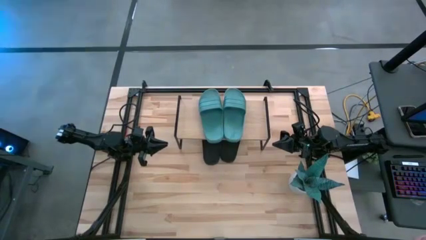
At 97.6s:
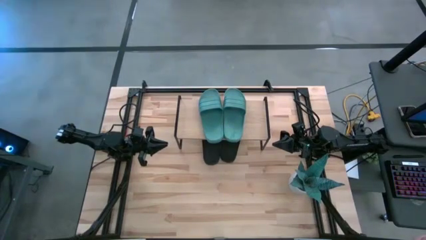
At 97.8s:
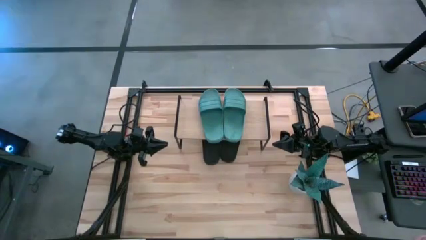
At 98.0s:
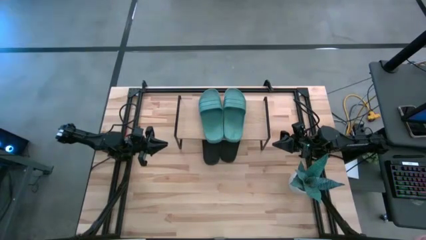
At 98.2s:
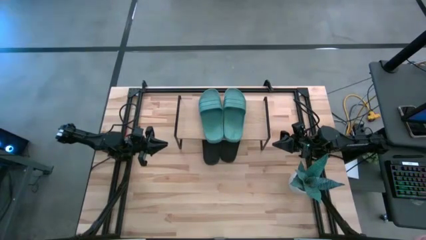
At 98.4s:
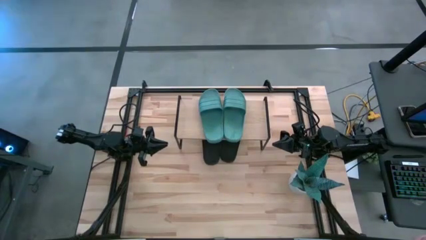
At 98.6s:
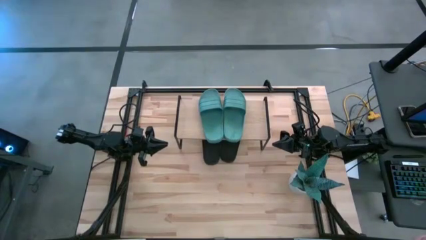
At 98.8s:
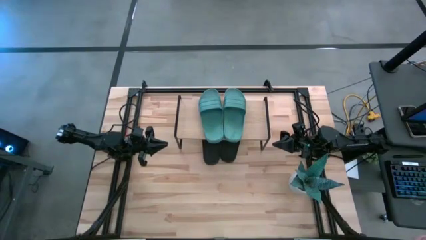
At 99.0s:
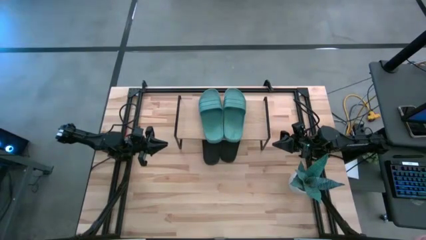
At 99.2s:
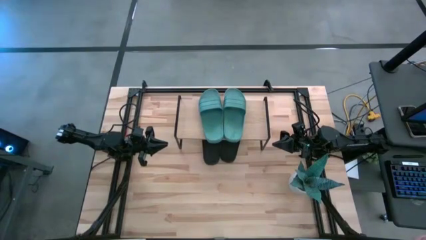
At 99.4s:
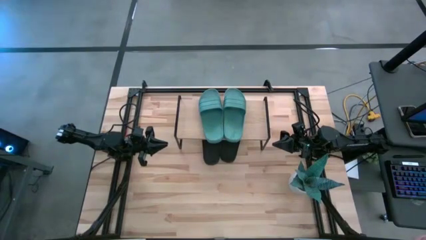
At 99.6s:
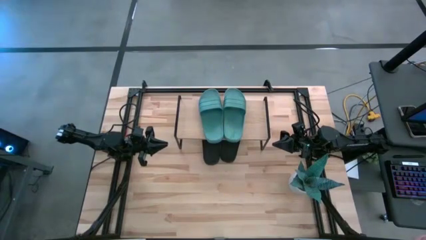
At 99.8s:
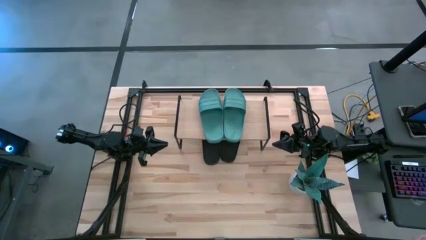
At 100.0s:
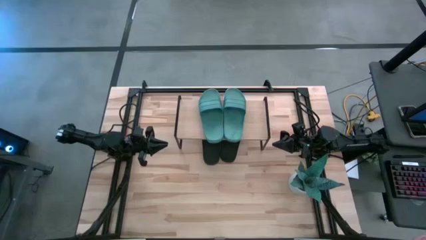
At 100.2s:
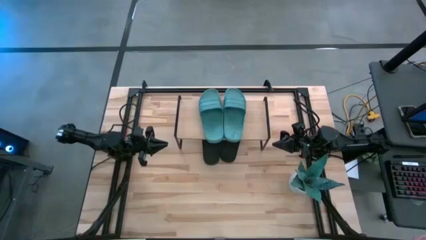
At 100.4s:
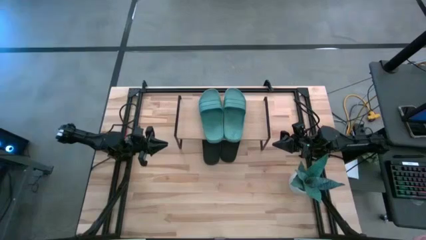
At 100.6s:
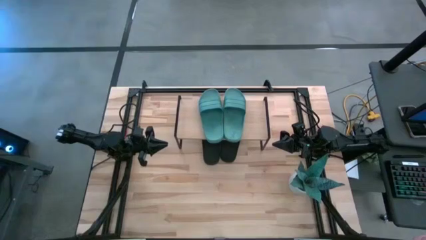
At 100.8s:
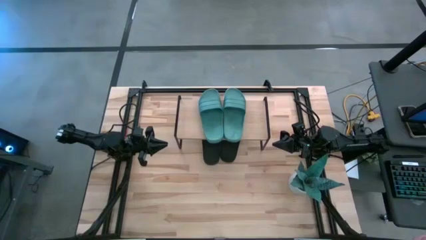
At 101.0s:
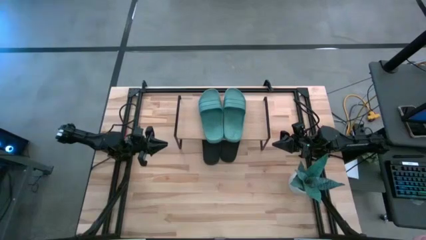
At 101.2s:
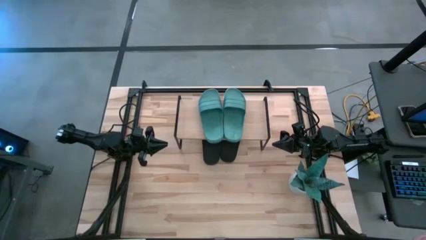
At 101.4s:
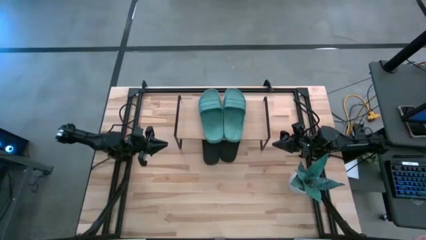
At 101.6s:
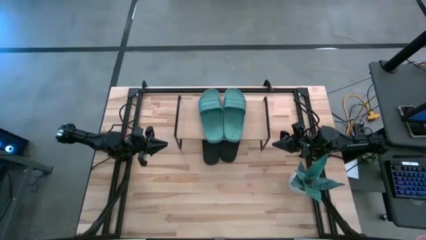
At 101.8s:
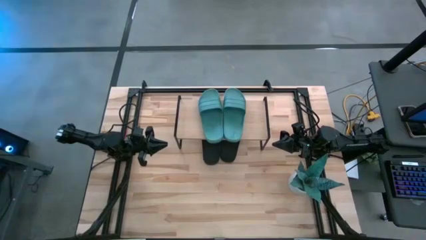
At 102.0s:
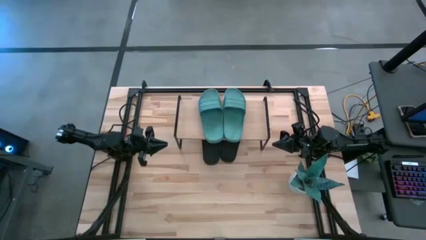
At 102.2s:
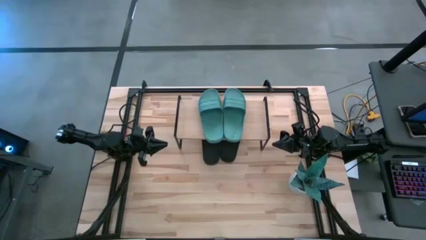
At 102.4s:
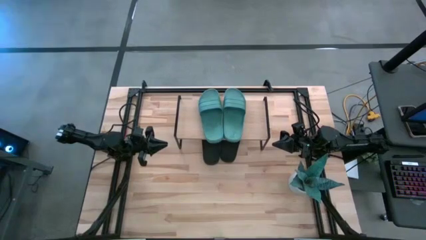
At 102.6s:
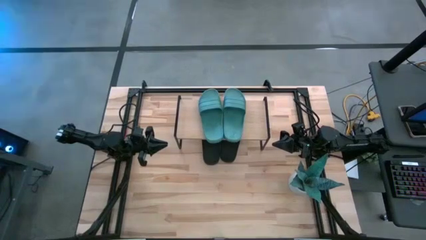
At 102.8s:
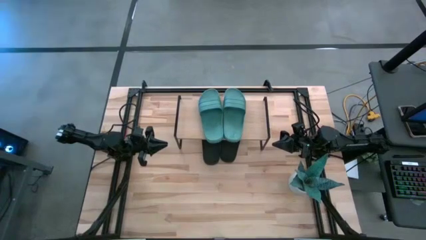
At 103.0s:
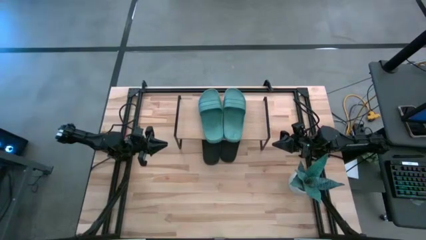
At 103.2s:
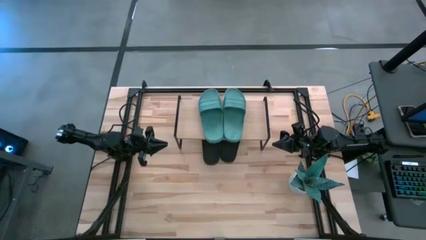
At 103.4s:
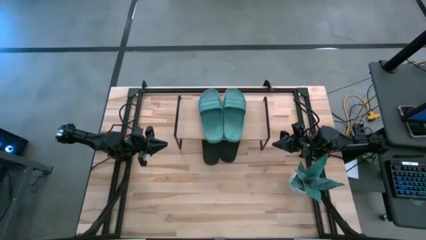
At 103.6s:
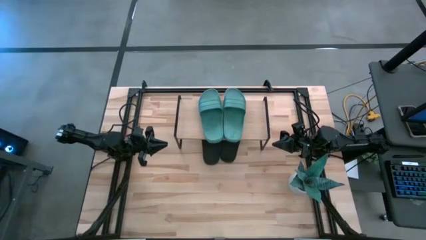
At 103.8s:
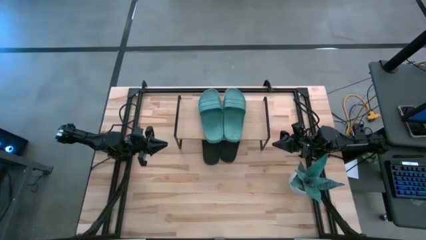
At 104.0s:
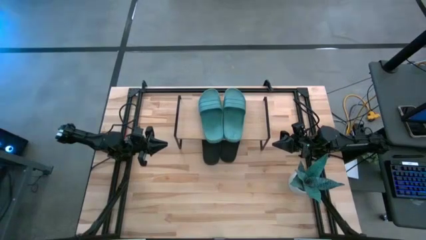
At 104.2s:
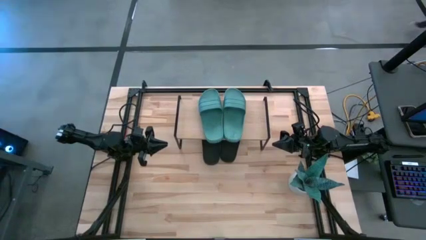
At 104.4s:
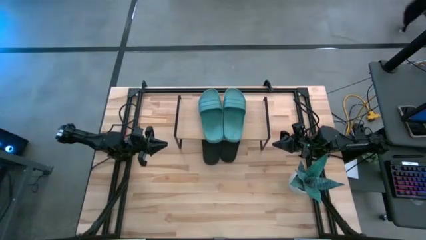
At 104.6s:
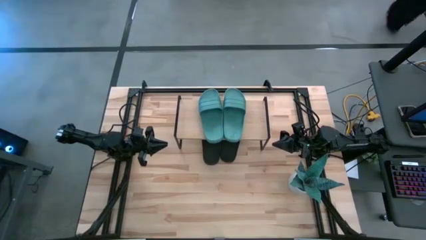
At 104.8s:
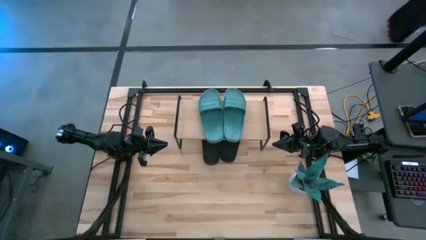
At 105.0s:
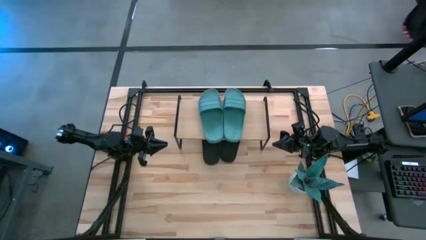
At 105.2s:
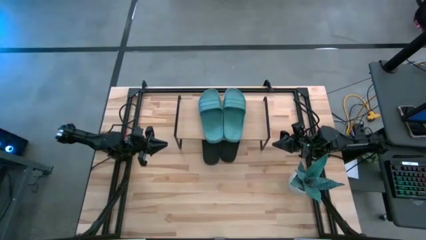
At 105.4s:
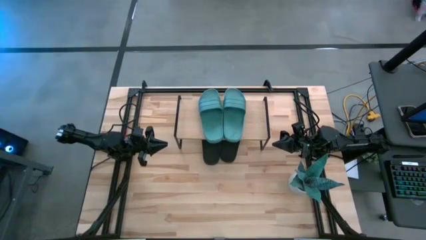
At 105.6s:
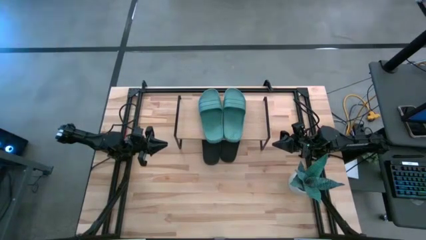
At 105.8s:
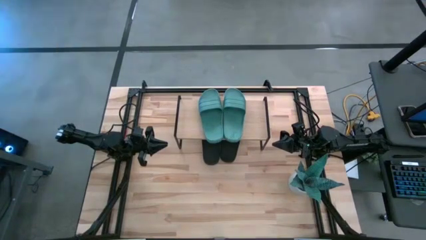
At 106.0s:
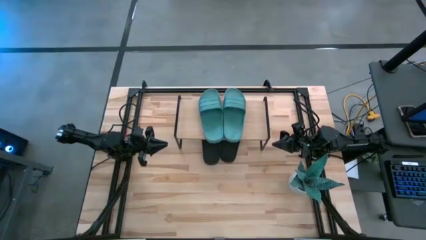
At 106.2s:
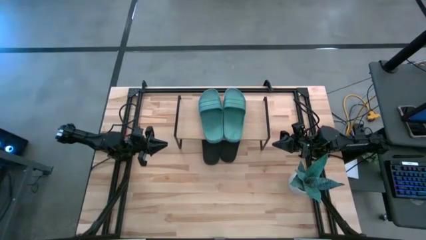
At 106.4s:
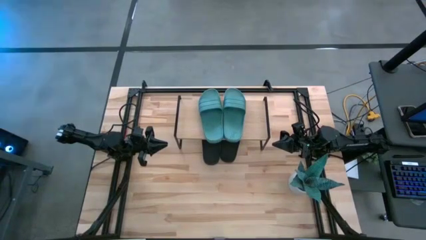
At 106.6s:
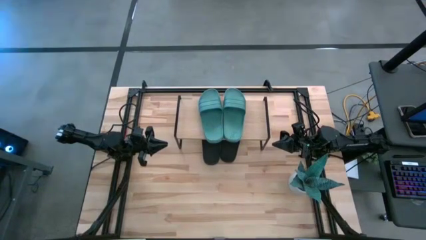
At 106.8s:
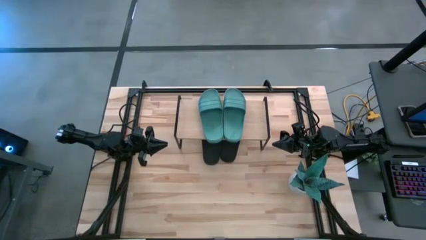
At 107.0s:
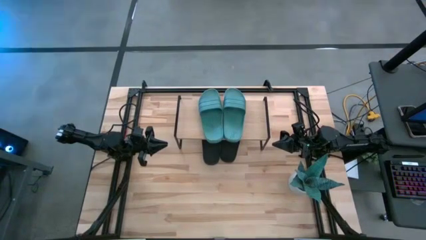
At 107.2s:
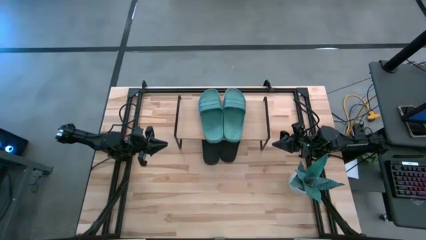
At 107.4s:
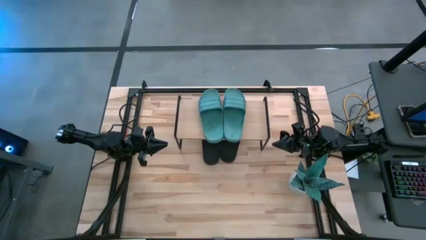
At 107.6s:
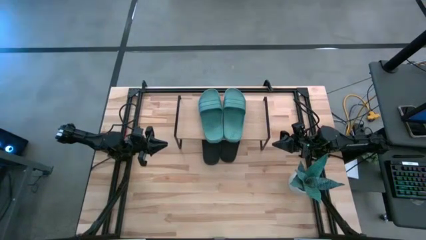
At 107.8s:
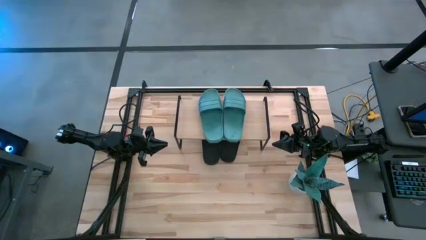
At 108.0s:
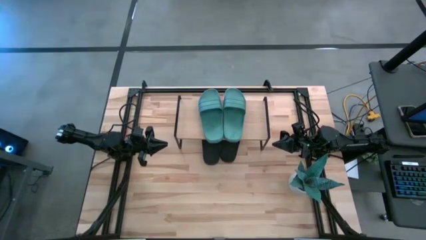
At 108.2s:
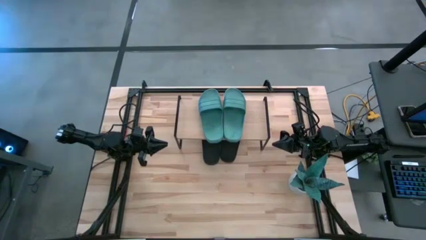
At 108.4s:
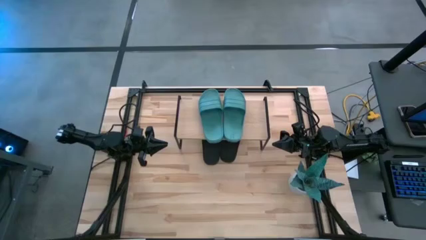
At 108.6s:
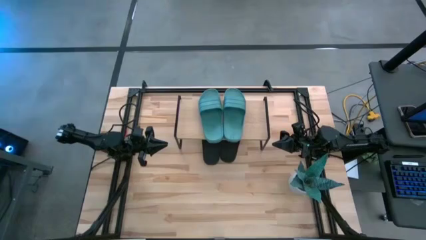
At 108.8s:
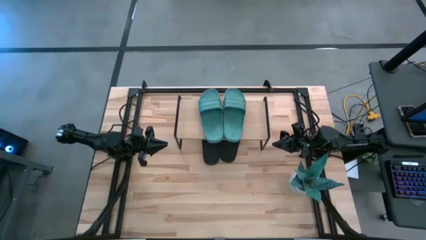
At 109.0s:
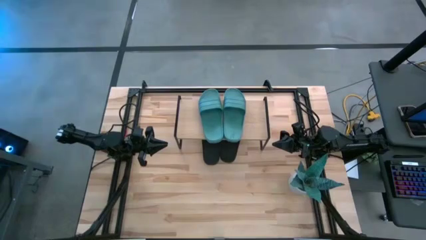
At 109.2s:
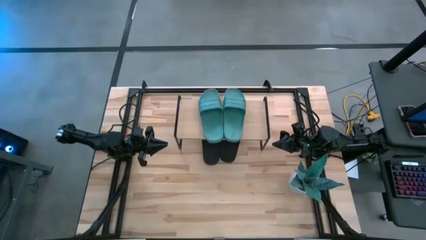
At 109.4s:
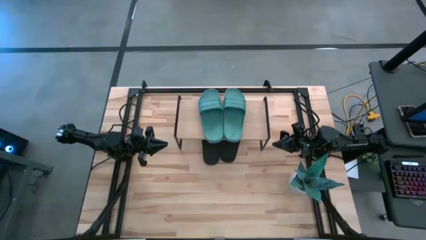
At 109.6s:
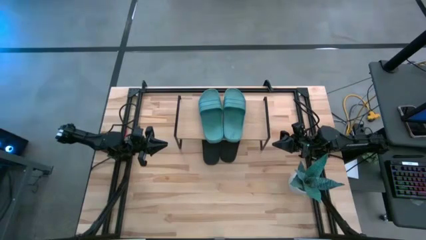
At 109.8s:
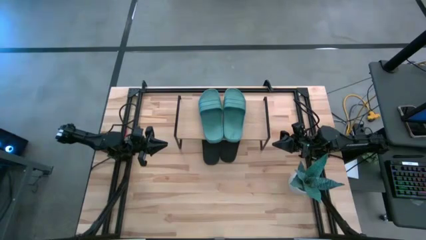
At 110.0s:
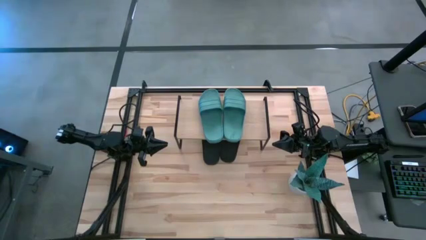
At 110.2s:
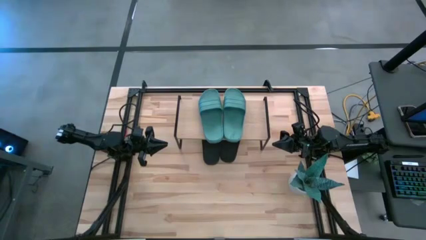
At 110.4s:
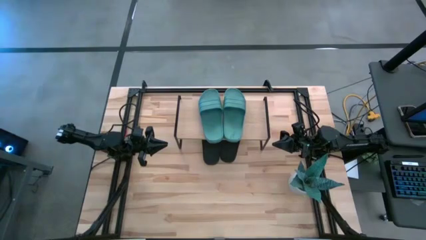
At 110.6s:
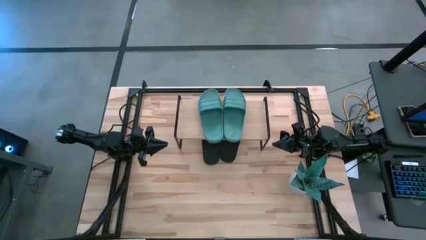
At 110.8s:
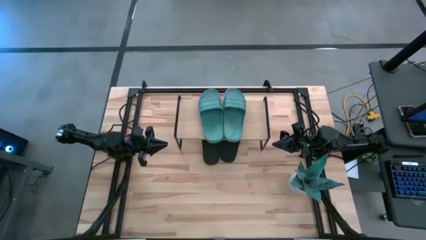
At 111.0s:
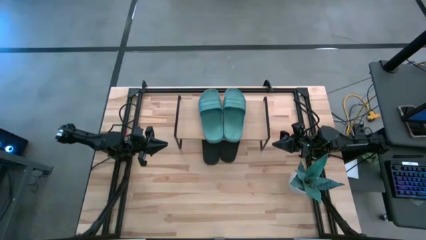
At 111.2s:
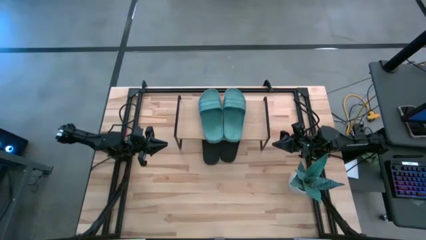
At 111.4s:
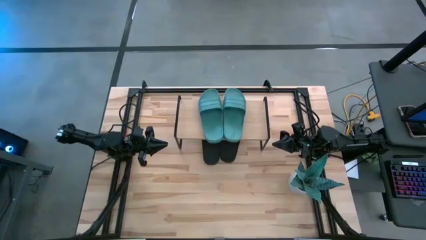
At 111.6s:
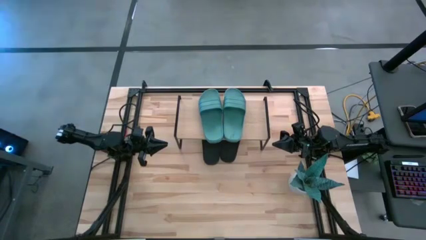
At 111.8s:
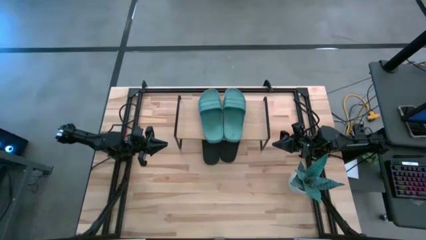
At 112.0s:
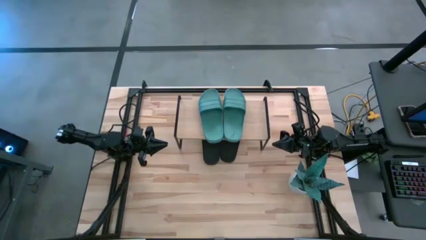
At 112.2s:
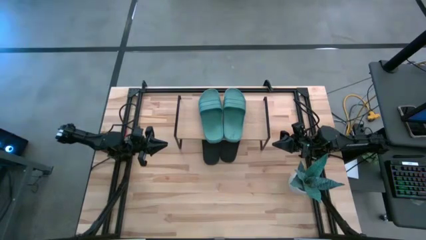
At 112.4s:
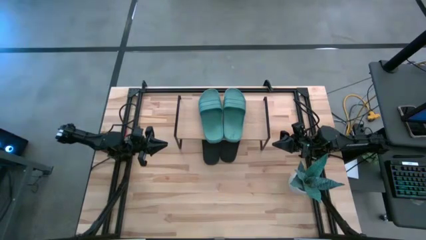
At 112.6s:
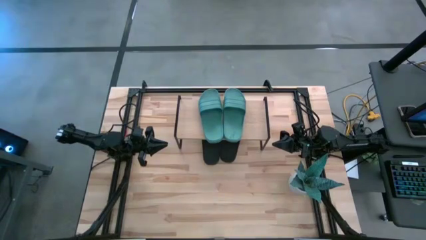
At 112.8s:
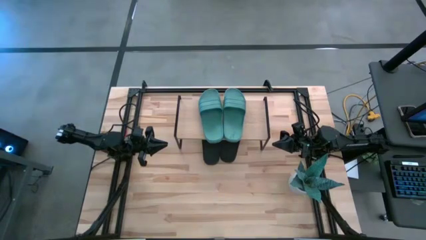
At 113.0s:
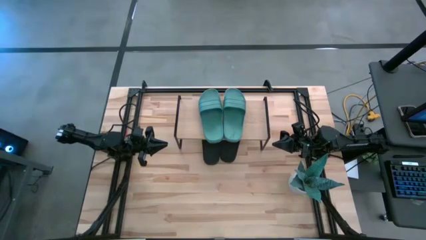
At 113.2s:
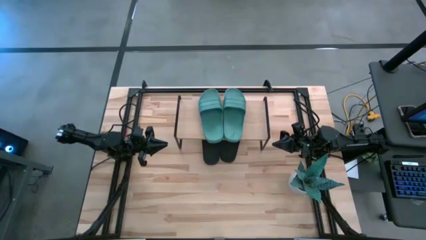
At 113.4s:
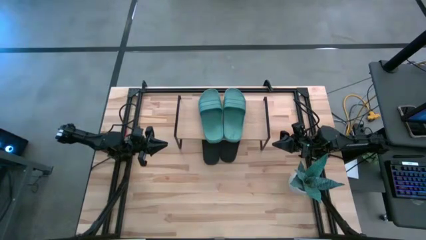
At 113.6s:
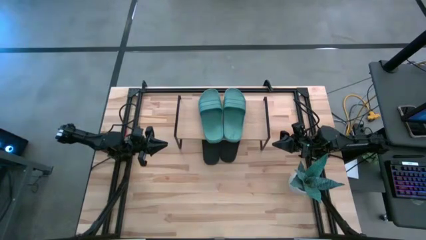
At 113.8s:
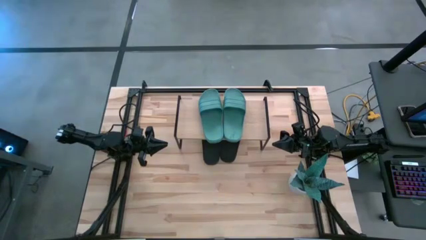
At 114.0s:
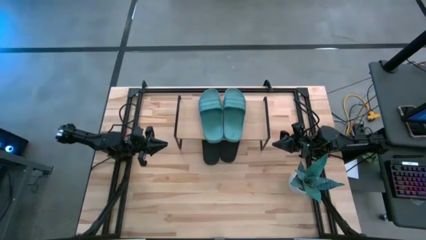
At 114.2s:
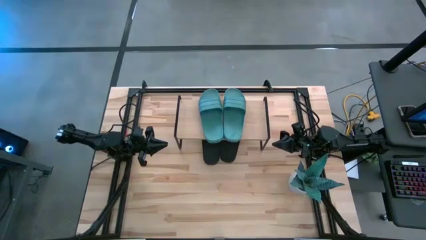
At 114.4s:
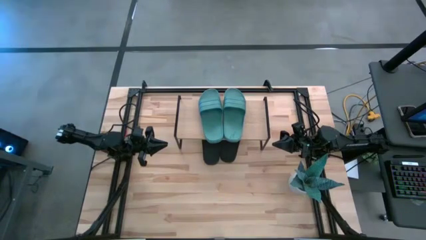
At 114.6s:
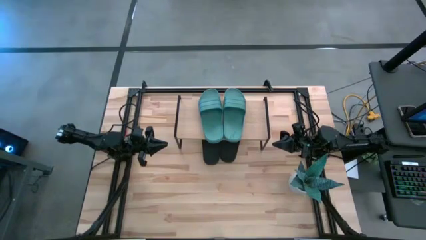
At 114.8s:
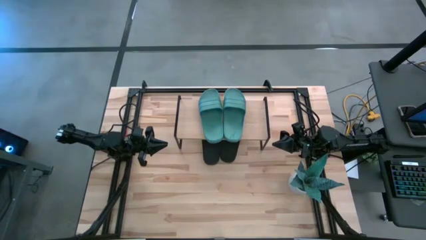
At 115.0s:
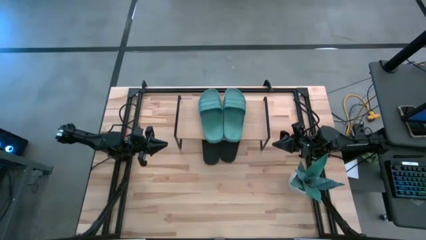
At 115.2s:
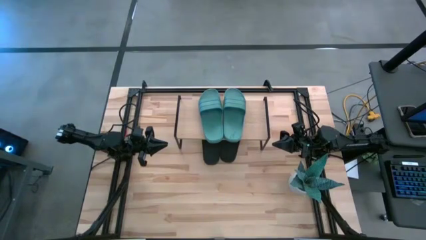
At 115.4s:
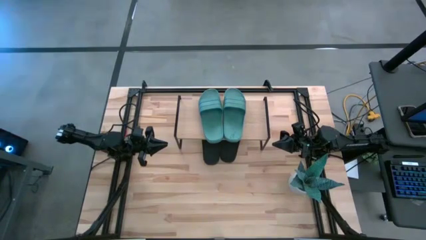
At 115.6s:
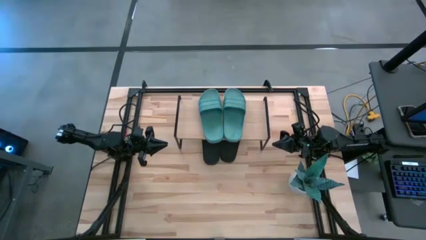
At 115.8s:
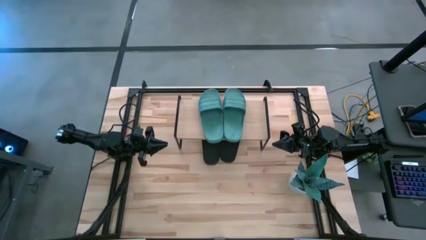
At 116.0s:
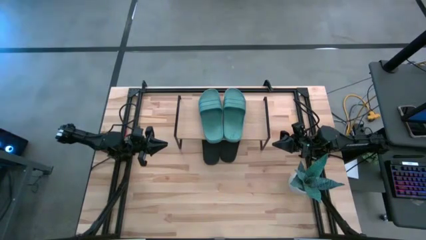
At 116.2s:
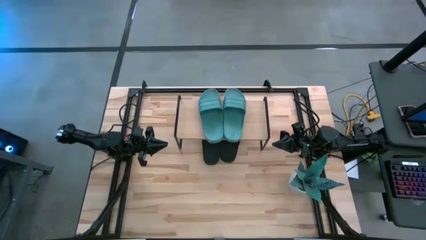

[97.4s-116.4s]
Task: Pick and place slides into the shelf
Return to Home Position
